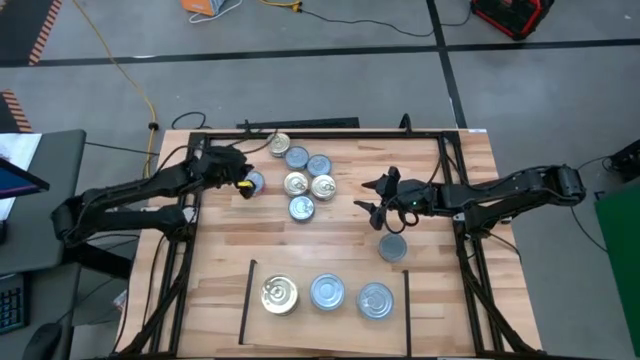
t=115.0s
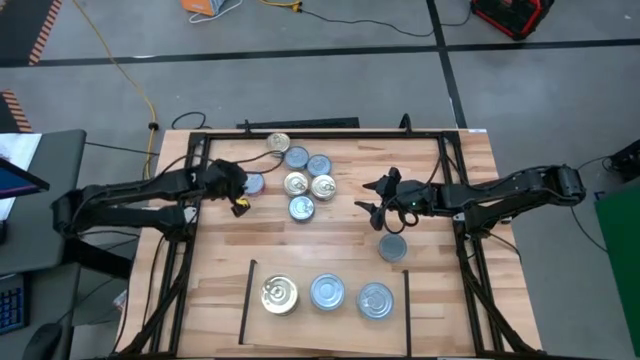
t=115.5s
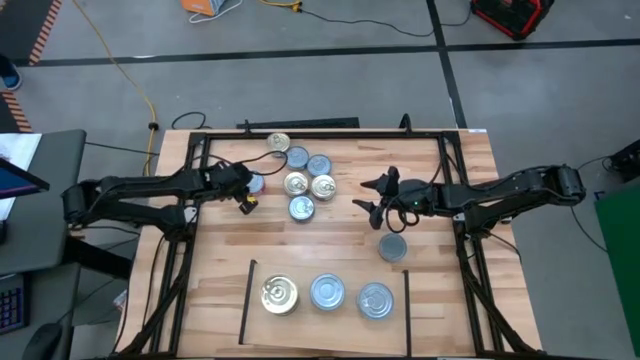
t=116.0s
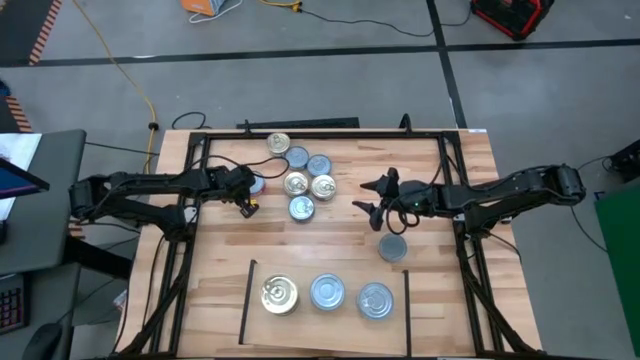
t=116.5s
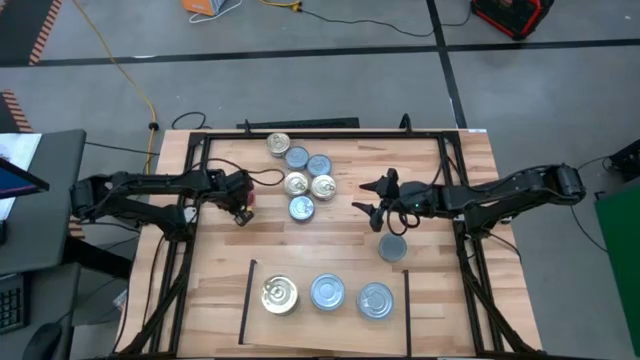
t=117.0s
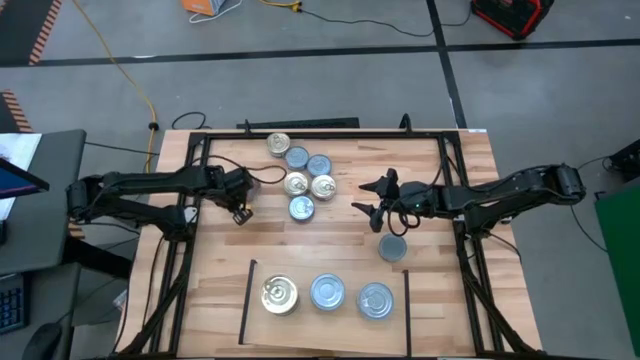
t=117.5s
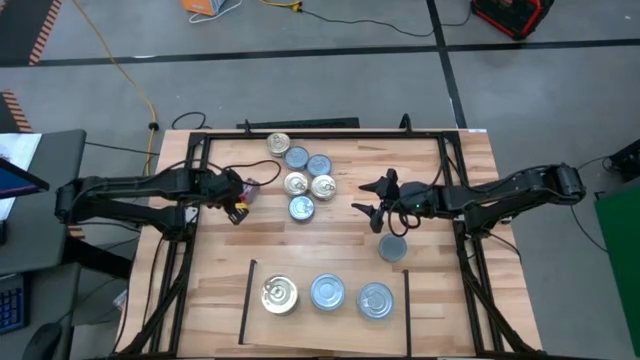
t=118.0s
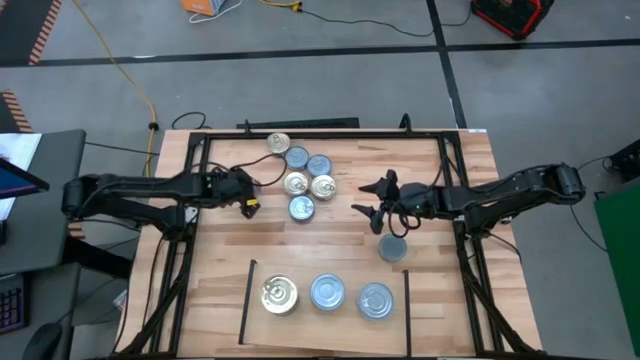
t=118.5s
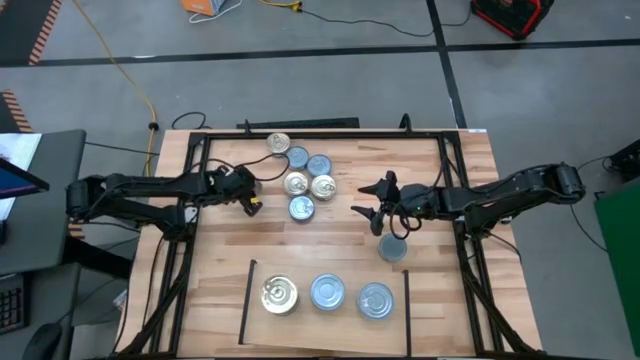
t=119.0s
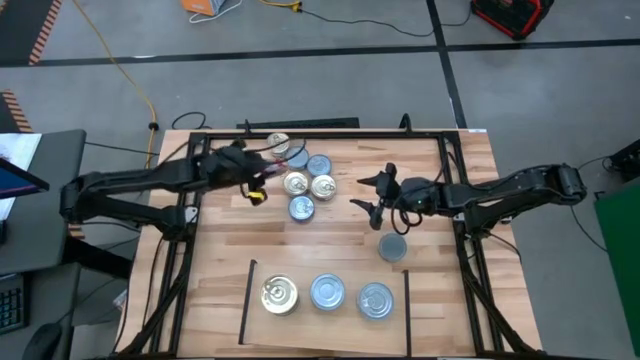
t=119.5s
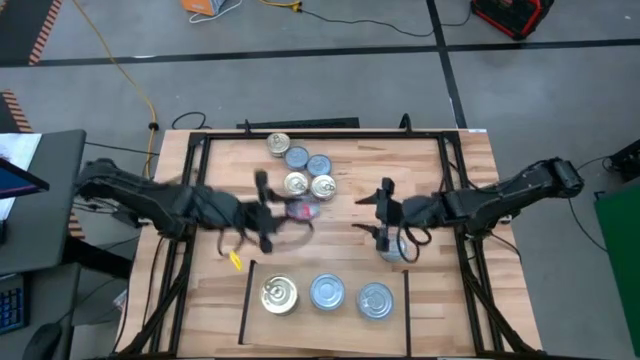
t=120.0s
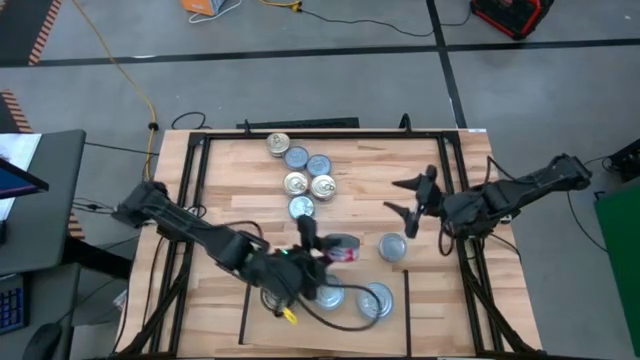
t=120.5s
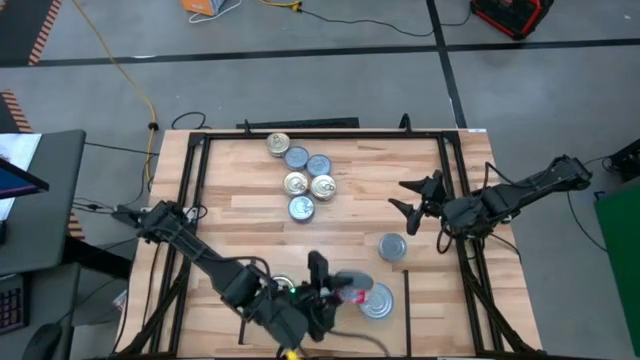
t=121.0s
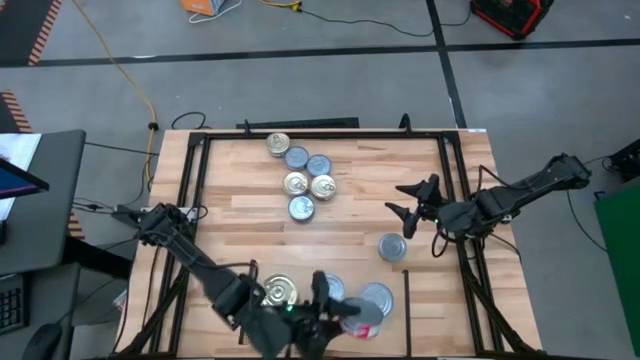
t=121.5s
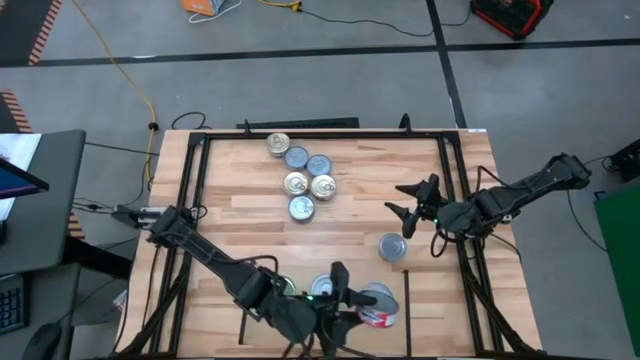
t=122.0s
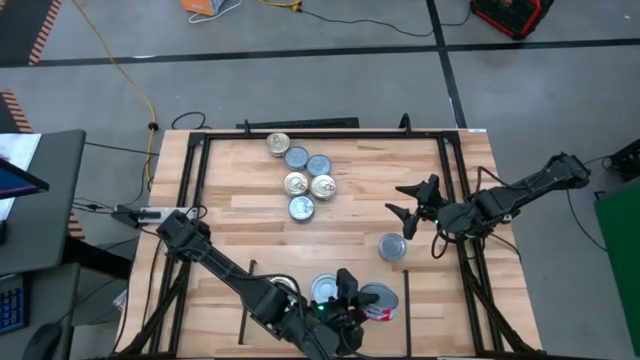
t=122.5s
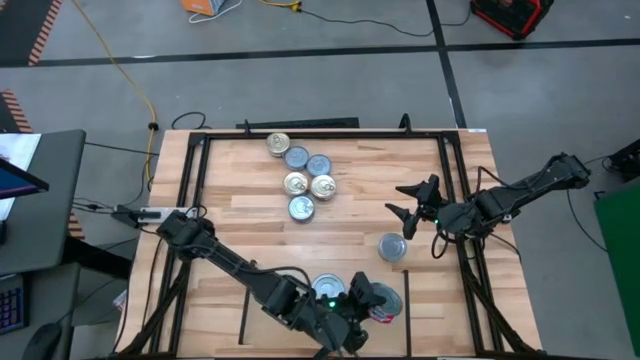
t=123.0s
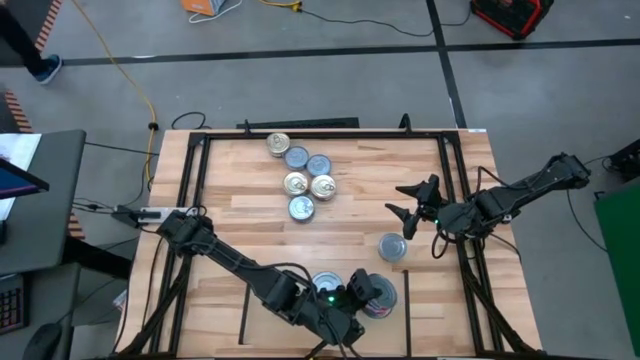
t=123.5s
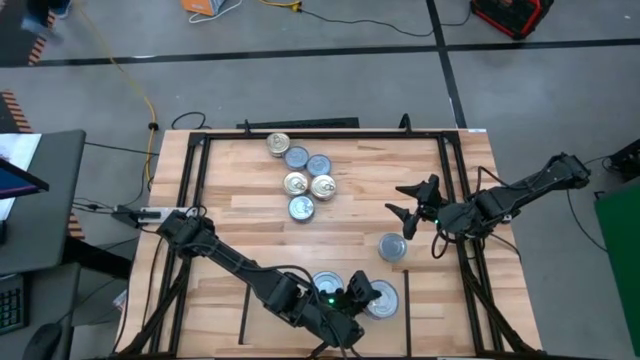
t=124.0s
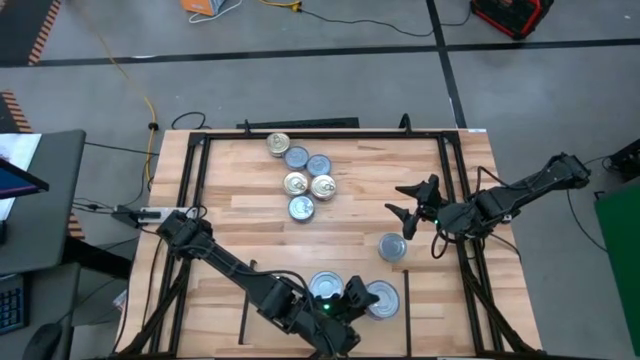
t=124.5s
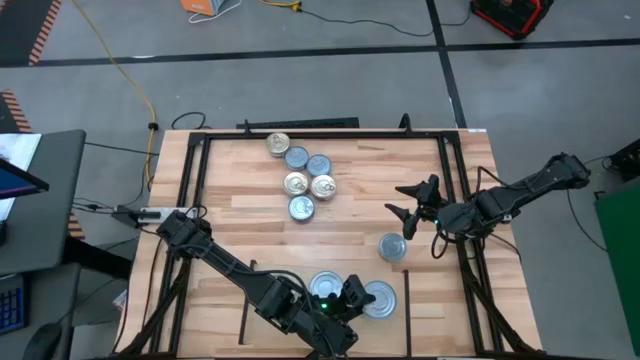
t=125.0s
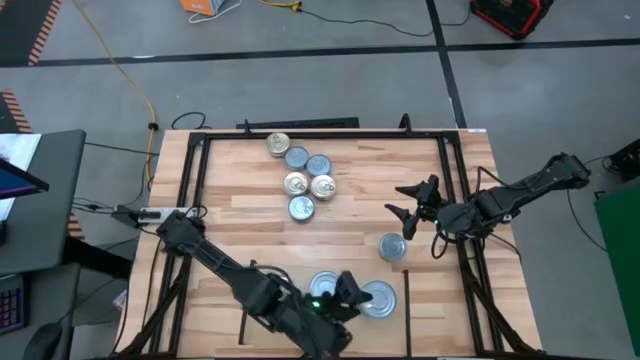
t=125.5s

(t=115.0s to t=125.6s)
Task: Stack canned seafood by type on shelf
Put the red tuna can on the top of the right stacked tuna cans on the shelf

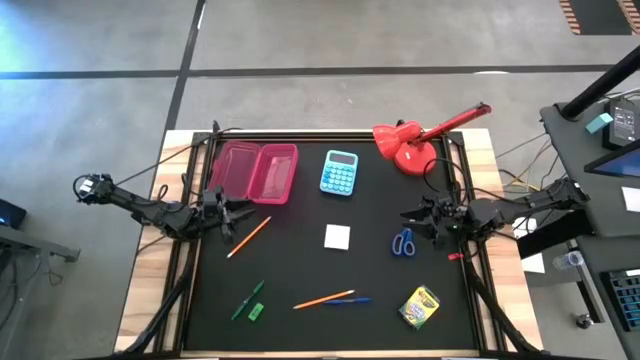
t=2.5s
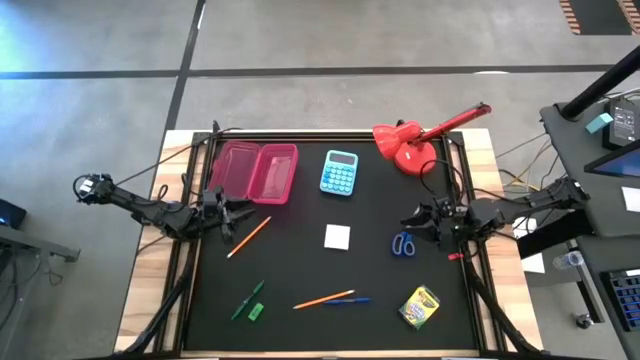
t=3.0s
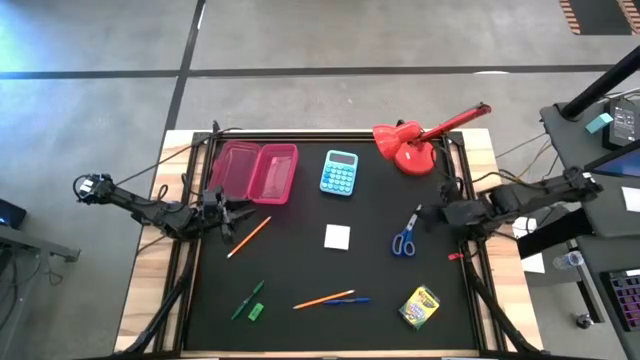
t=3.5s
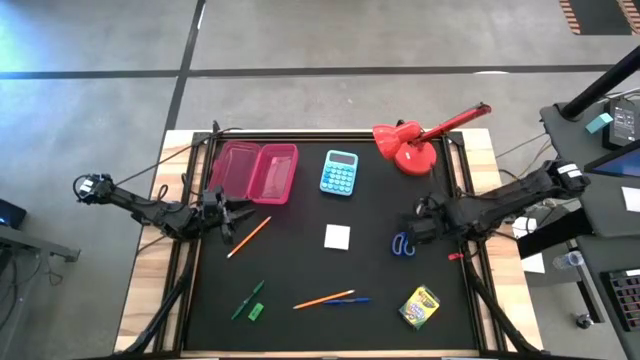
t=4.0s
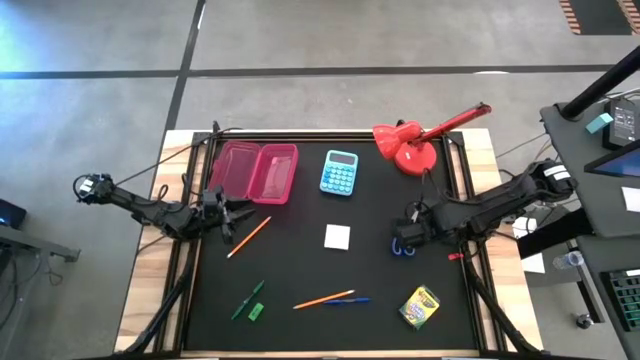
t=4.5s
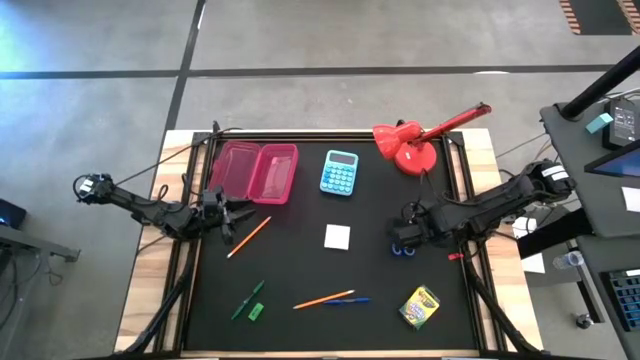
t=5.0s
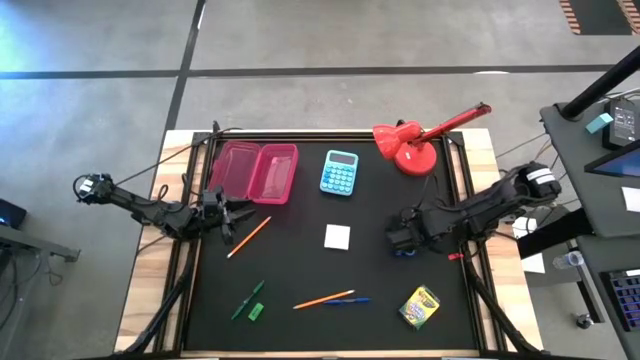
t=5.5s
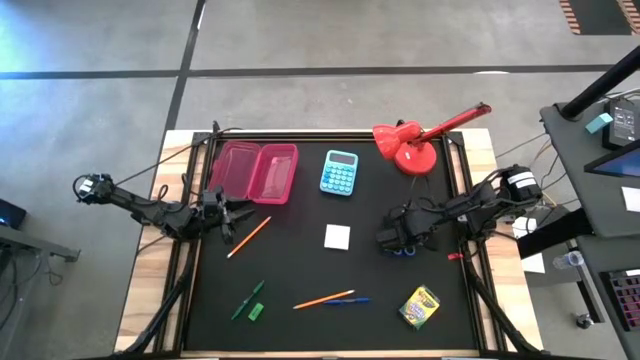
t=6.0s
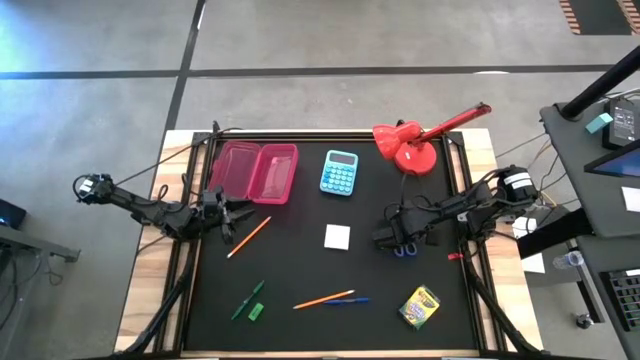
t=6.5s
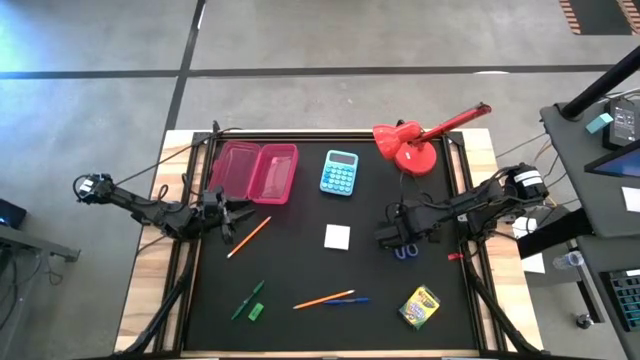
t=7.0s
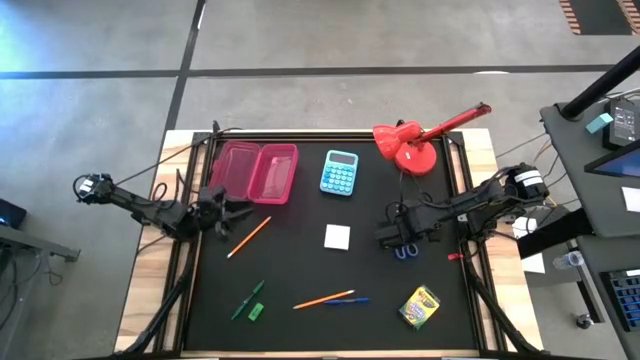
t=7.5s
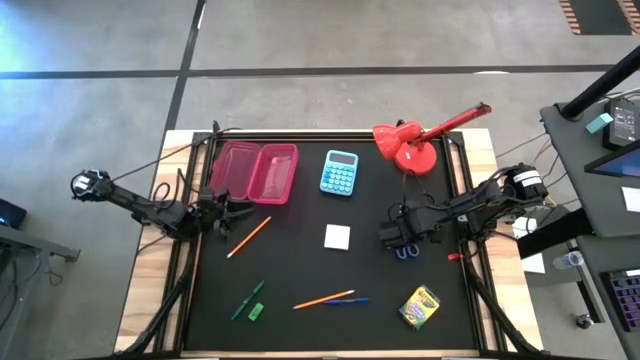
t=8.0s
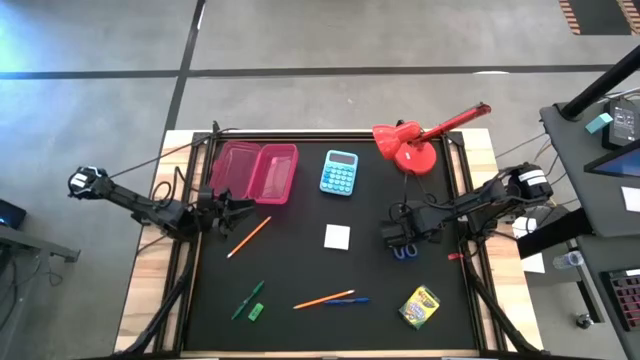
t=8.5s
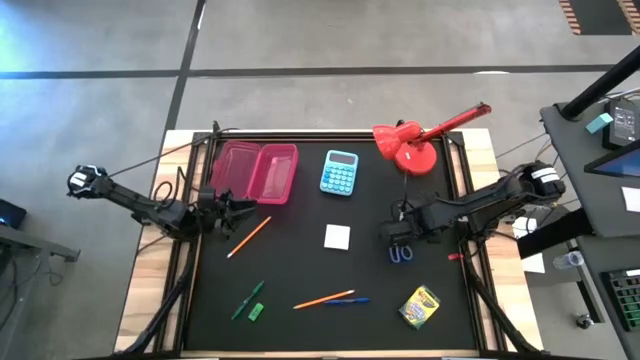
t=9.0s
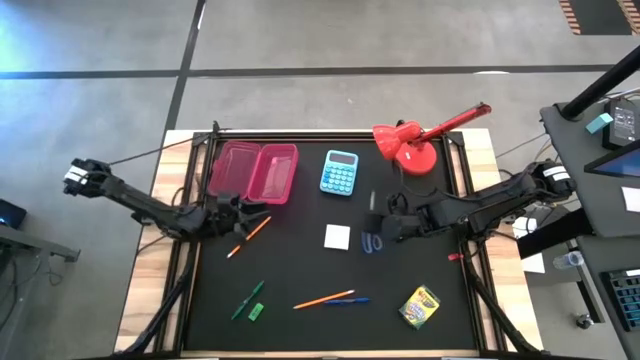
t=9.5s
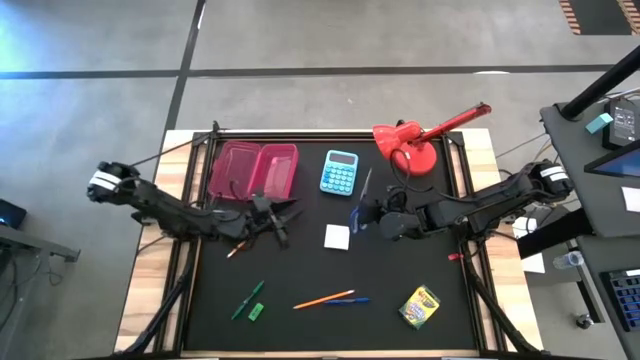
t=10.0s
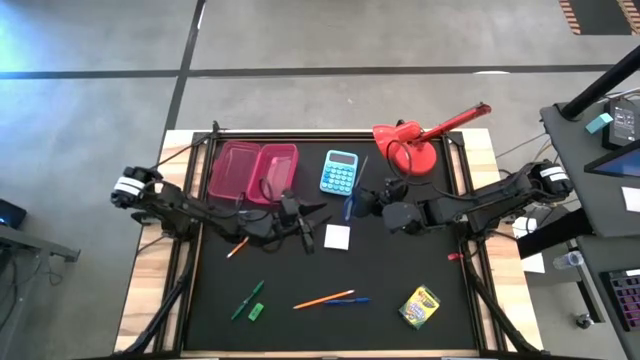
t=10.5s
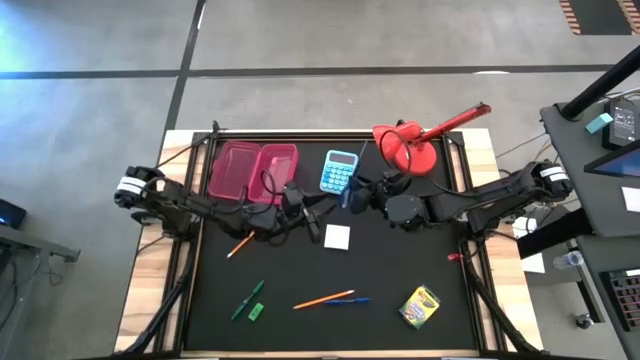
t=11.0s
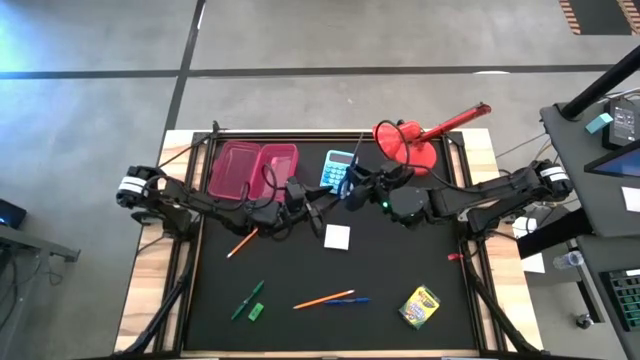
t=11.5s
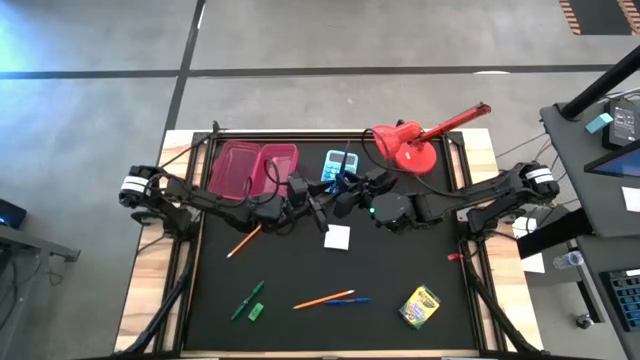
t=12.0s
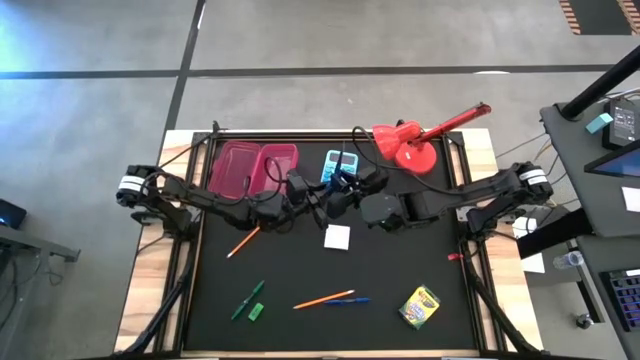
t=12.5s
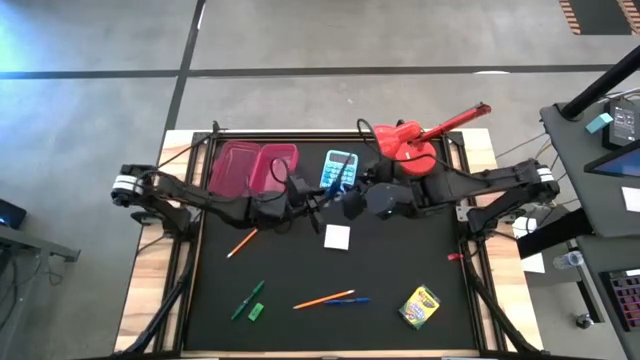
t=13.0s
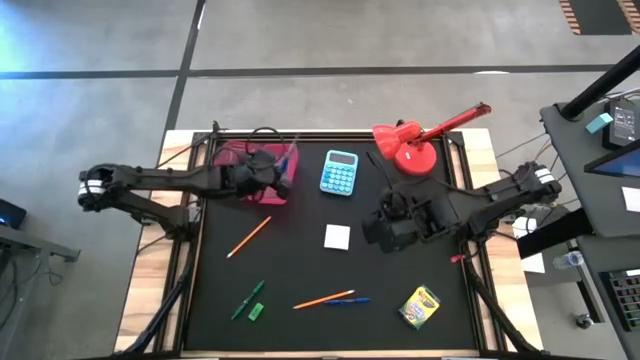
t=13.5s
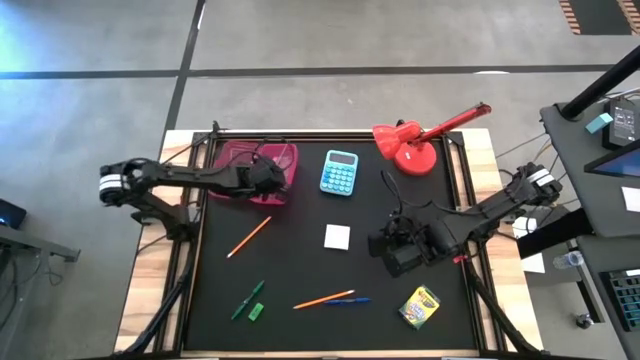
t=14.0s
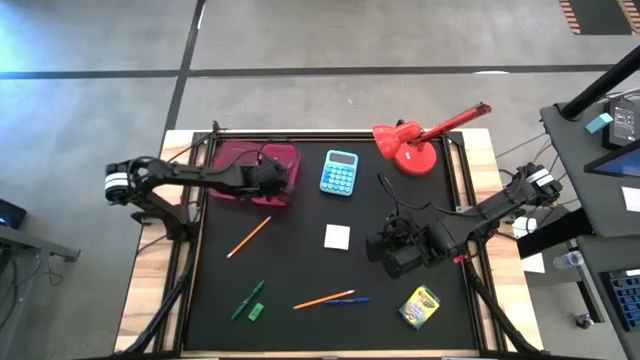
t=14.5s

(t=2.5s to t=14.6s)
Task: Pack school essentials
Put the blue scissors into the pink supply box
